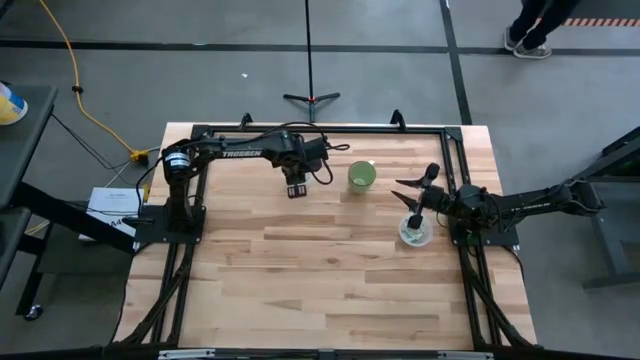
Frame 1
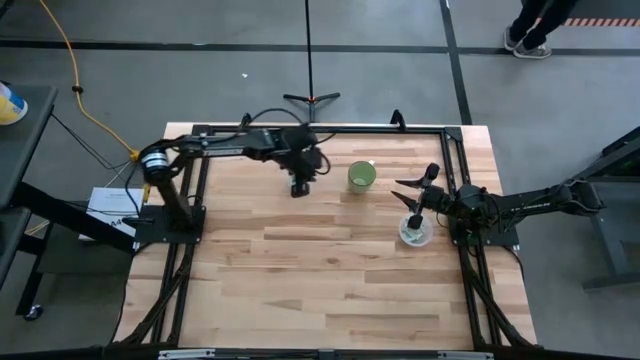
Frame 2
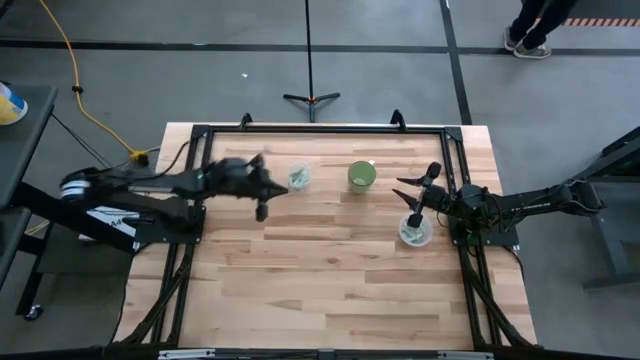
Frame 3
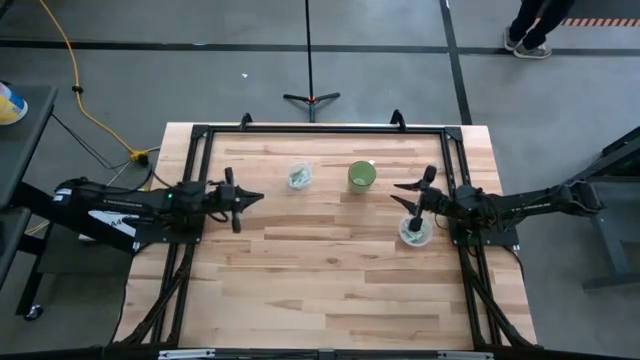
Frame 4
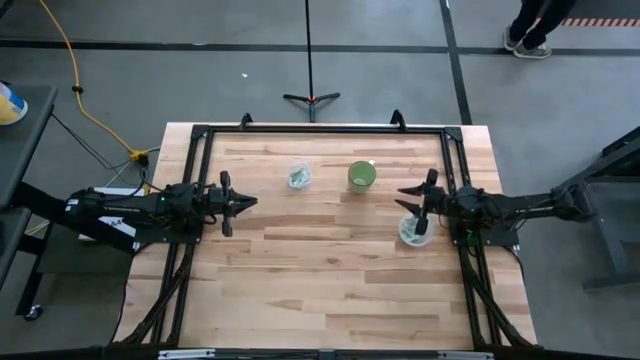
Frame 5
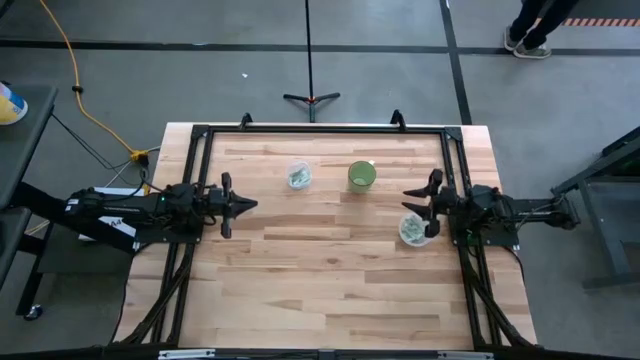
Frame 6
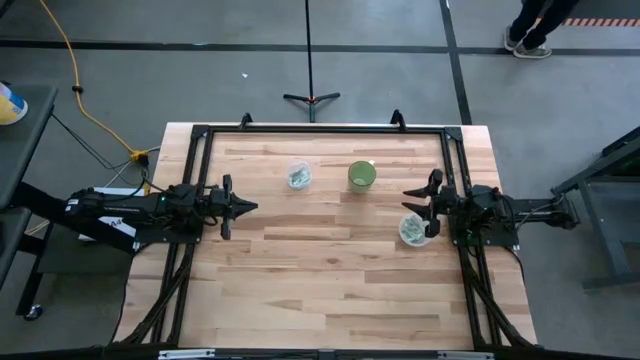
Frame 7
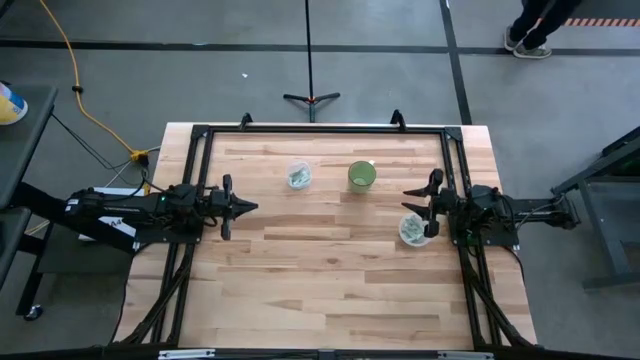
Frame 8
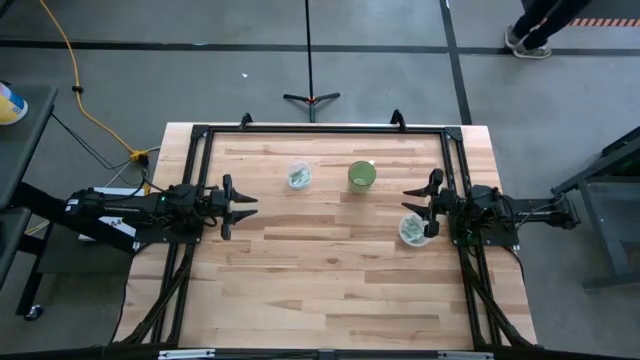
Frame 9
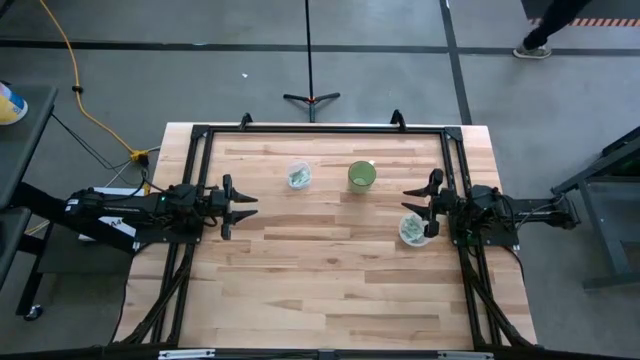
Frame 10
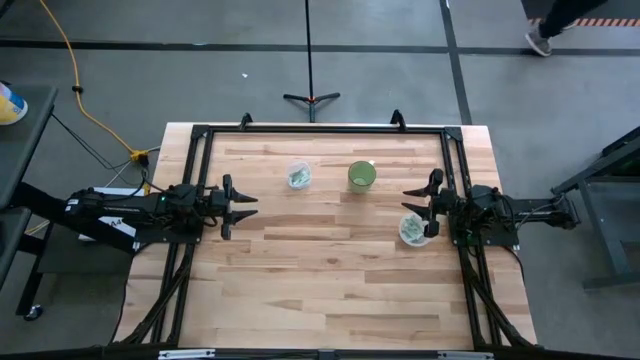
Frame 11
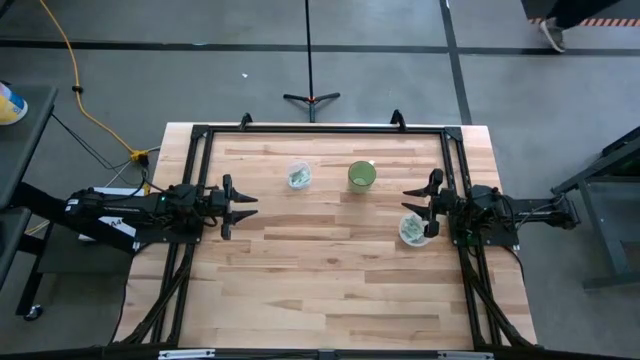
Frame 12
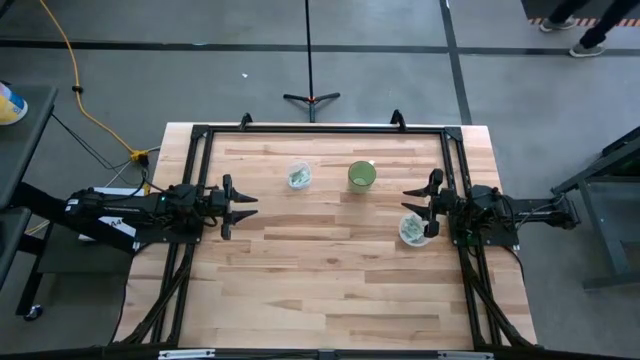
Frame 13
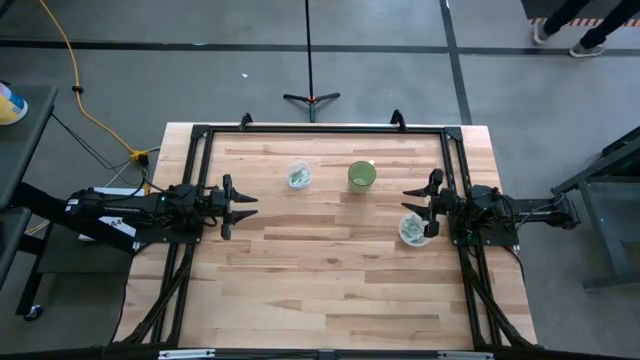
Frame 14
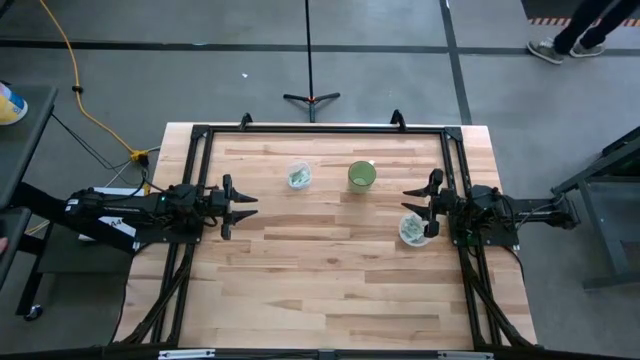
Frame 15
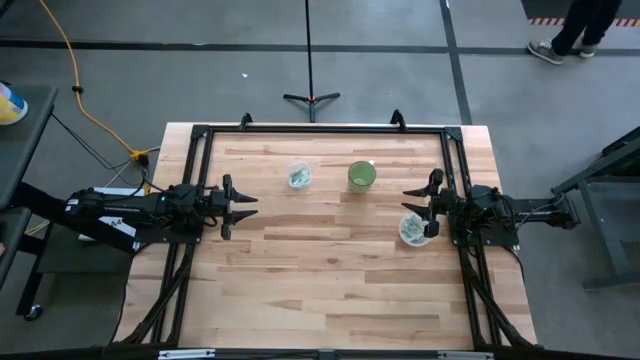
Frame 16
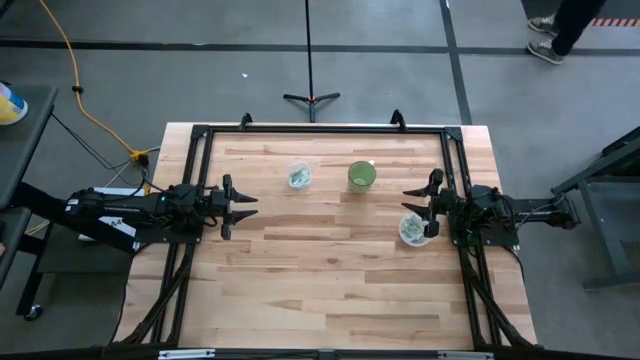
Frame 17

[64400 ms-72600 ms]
Task: Pick and place items into bin
Return to Home Position

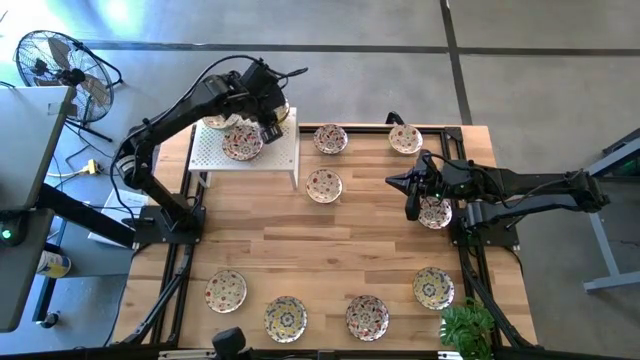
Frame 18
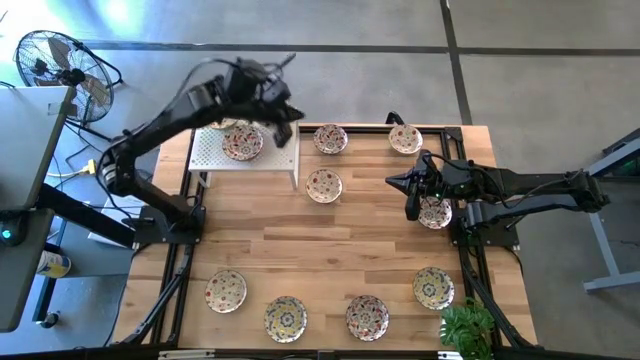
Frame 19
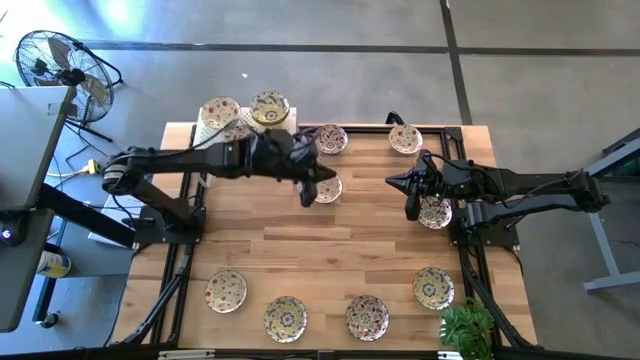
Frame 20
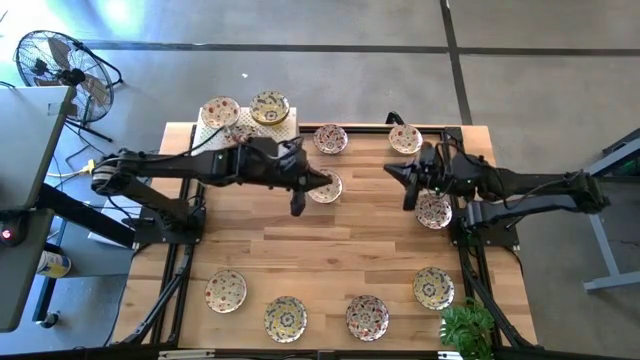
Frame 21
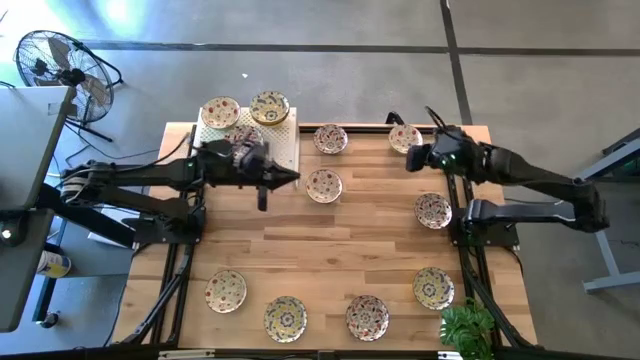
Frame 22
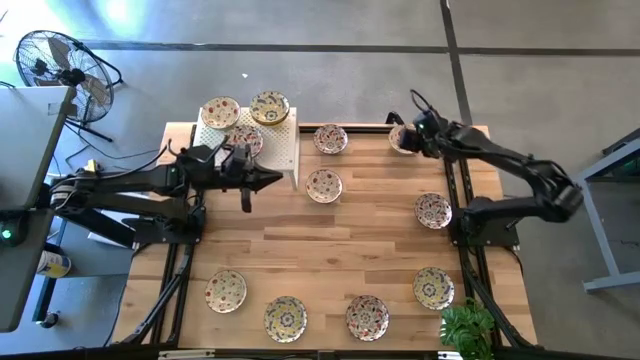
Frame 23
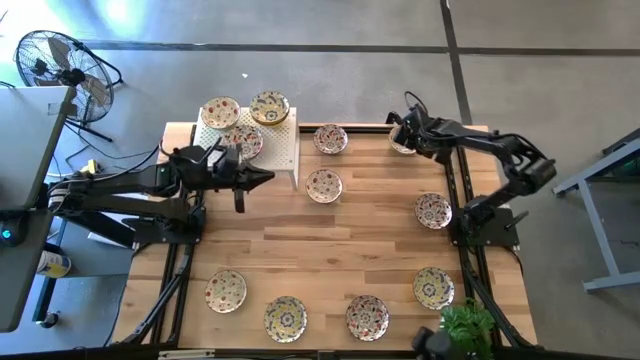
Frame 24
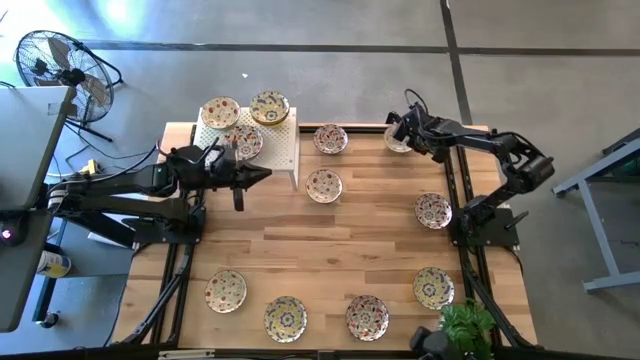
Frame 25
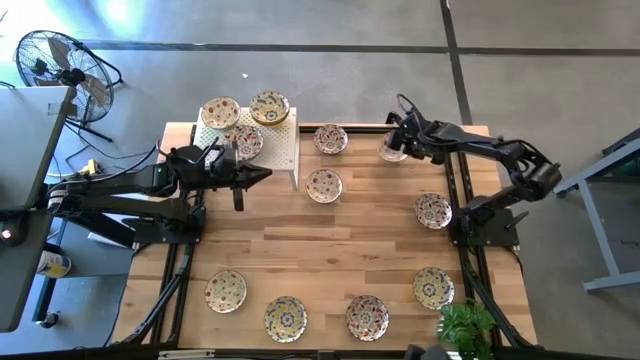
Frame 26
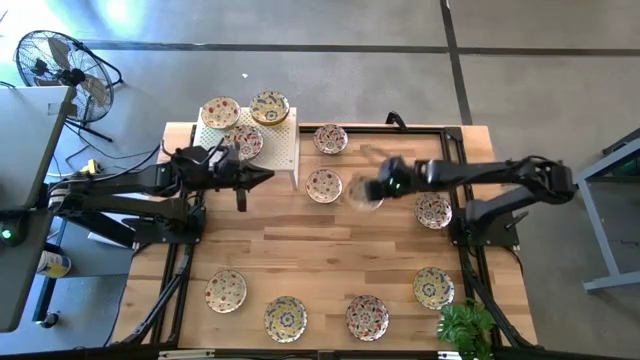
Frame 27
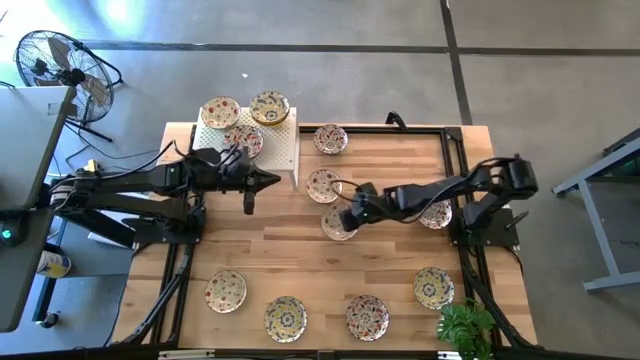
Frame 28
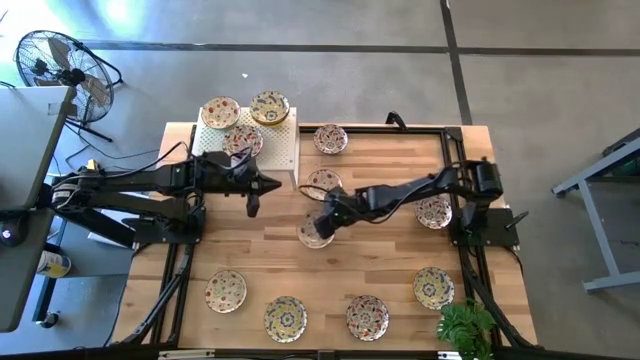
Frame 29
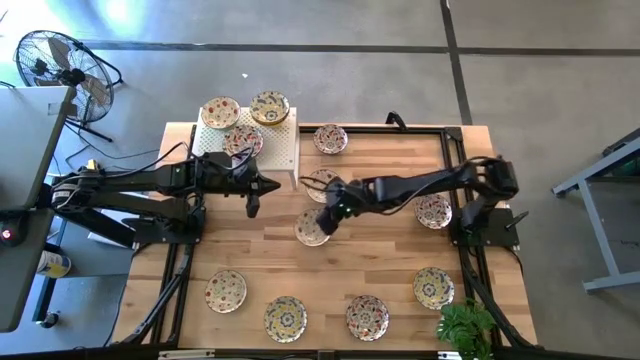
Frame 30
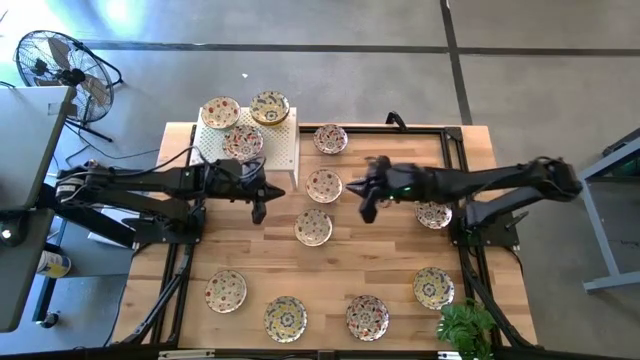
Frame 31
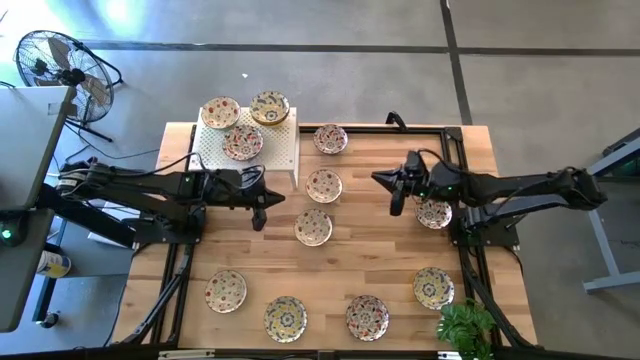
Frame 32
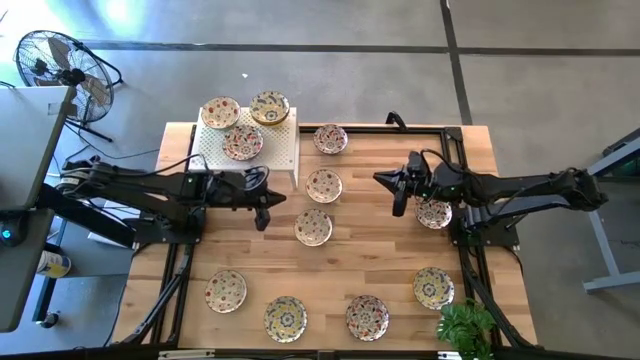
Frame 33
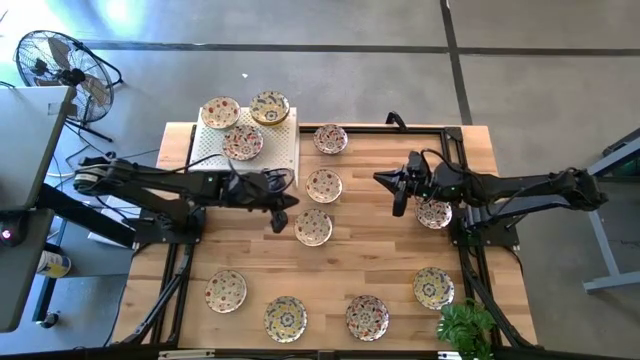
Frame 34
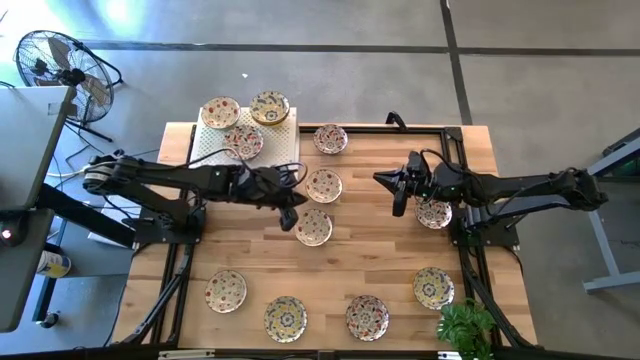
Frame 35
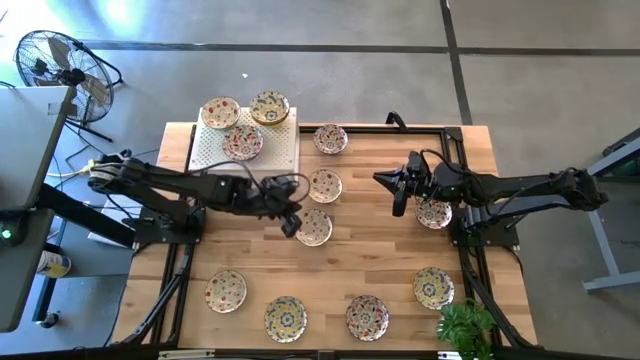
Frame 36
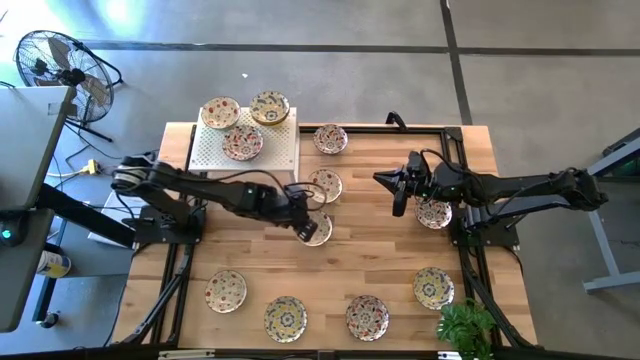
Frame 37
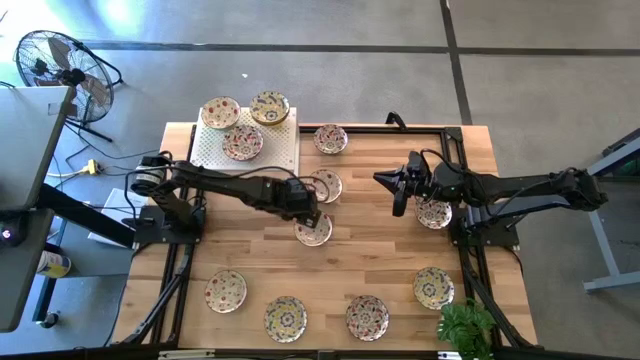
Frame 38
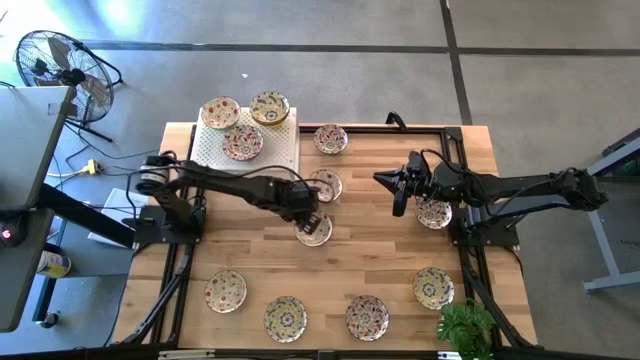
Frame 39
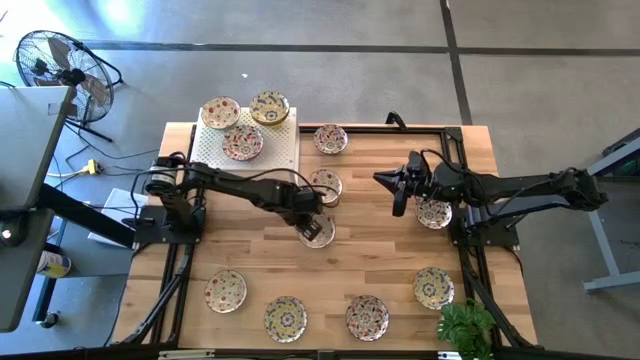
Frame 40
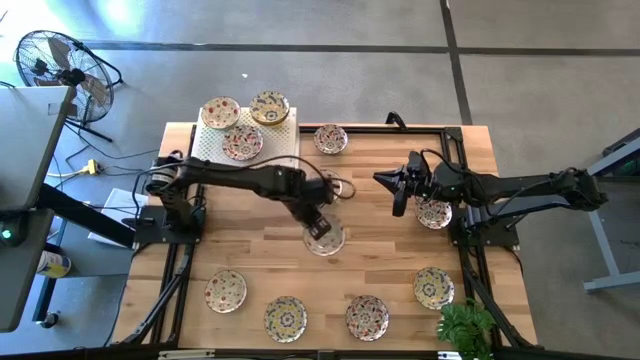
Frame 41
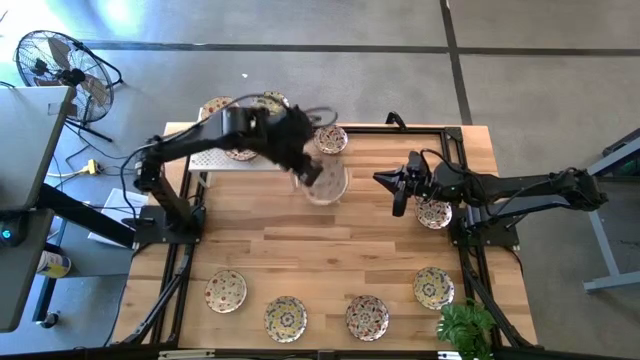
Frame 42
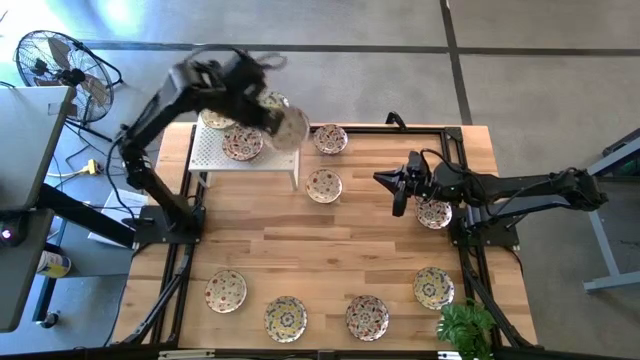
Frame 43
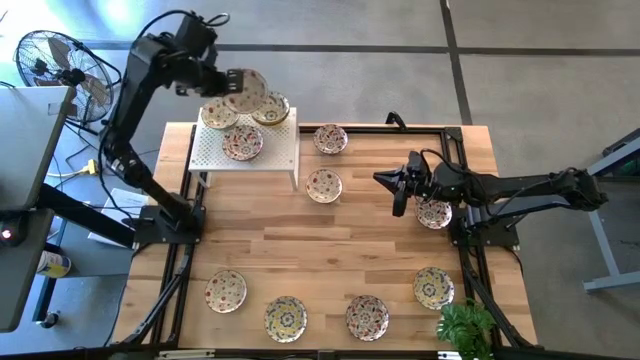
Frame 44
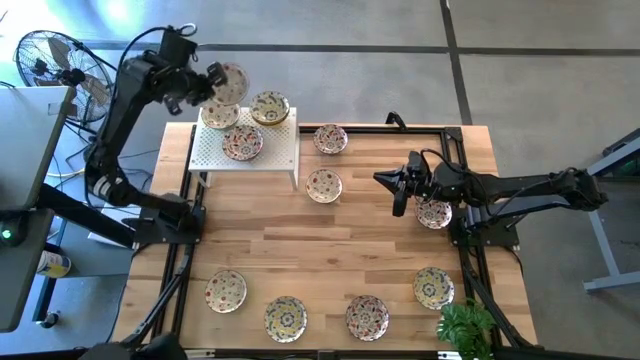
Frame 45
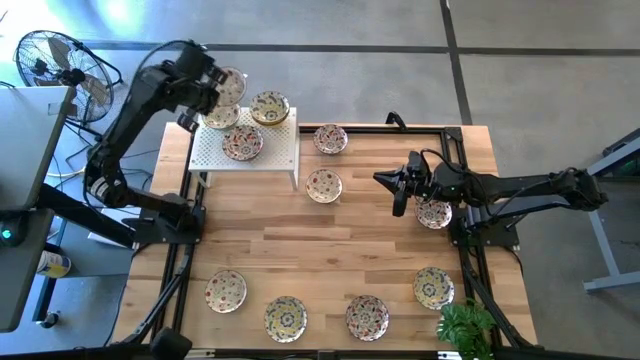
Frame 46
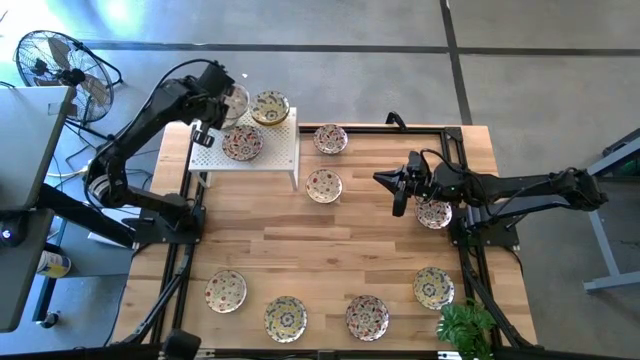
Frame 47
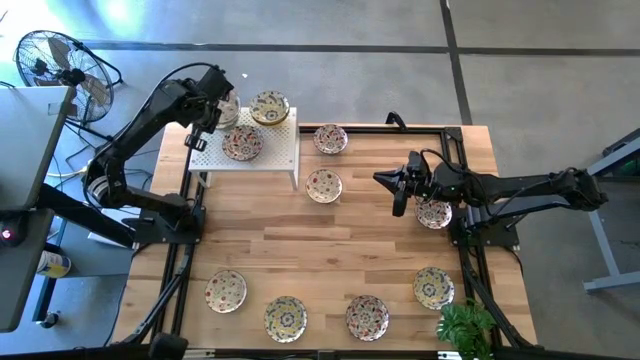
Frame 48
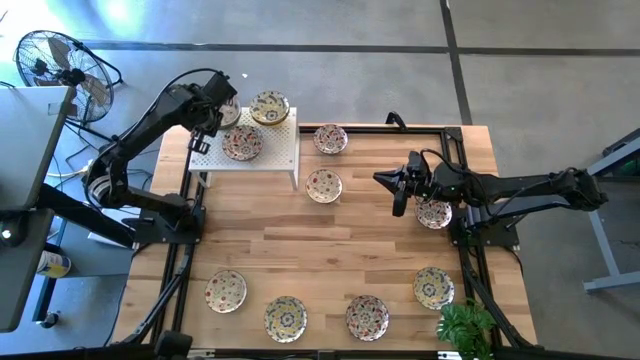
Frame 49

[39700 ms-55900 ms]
Task: Pick & Place Mini bowls
Stack the red patterned bowl on the red patterned bowl on the shelf
